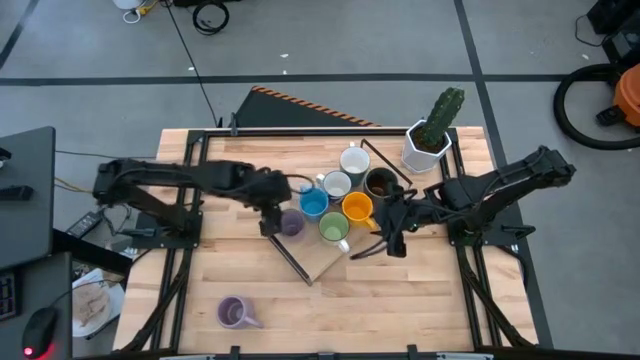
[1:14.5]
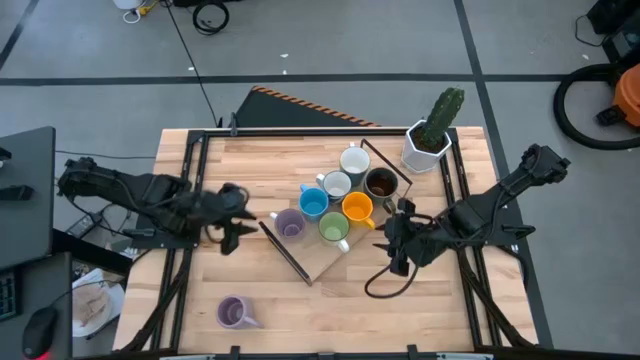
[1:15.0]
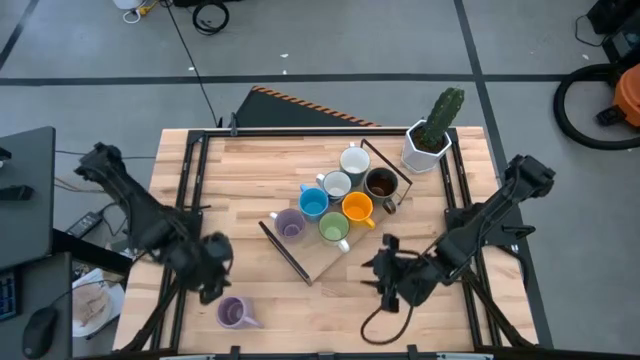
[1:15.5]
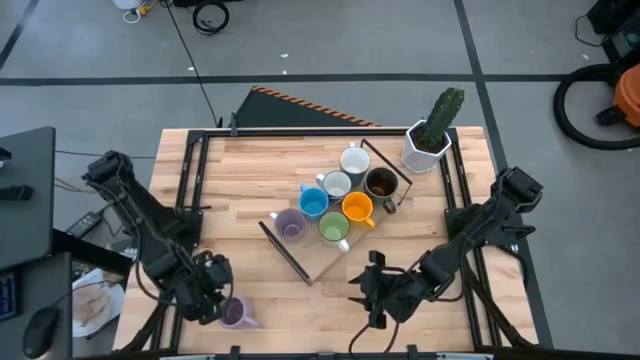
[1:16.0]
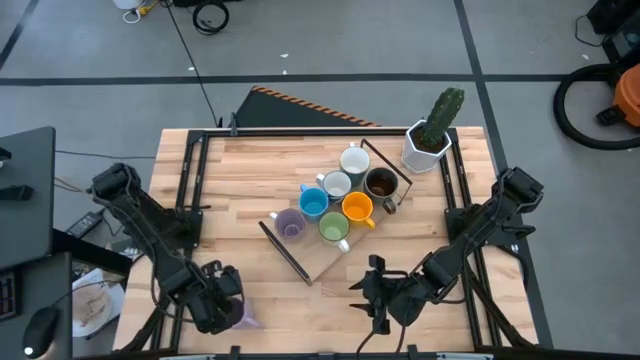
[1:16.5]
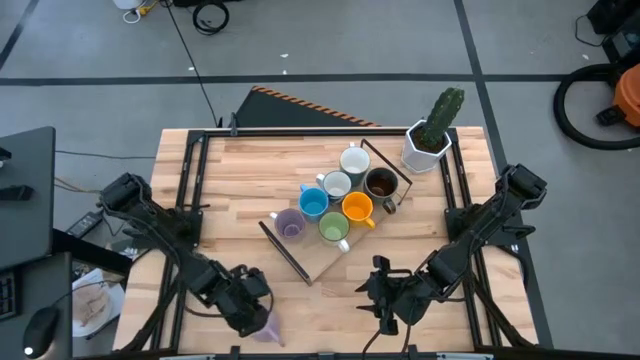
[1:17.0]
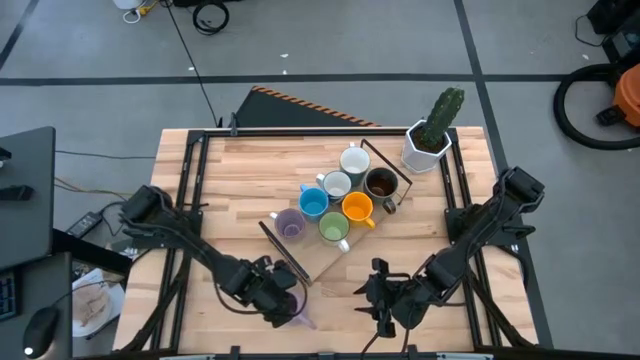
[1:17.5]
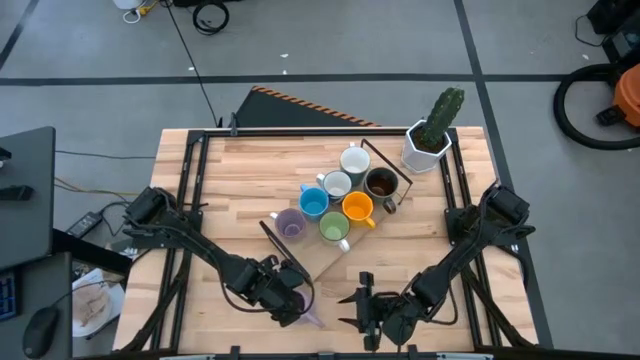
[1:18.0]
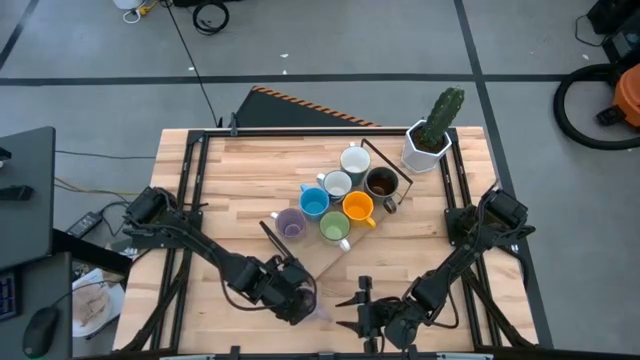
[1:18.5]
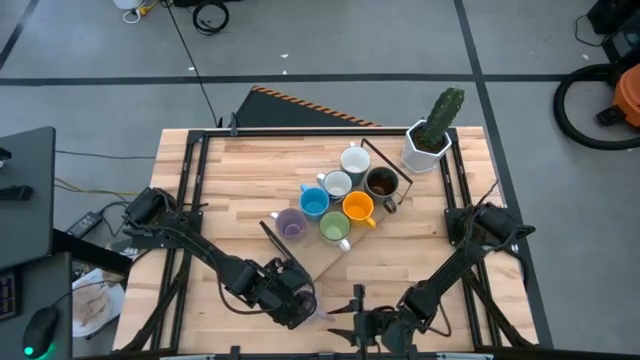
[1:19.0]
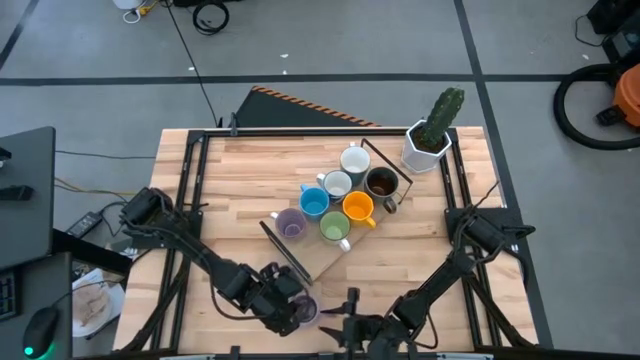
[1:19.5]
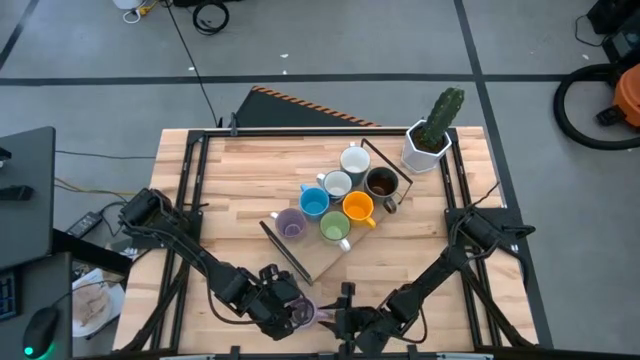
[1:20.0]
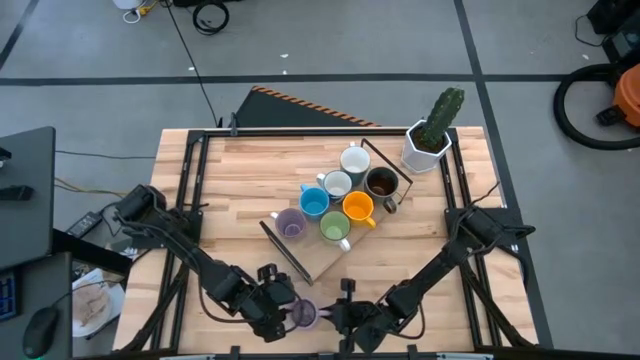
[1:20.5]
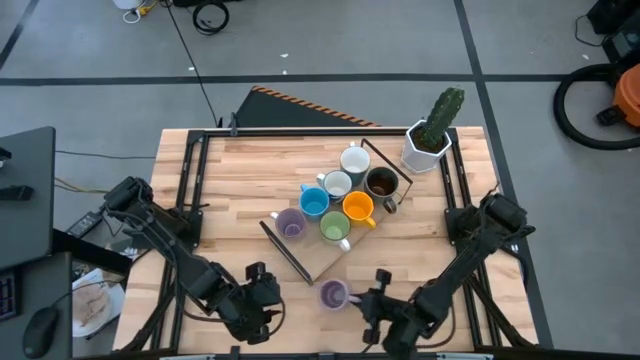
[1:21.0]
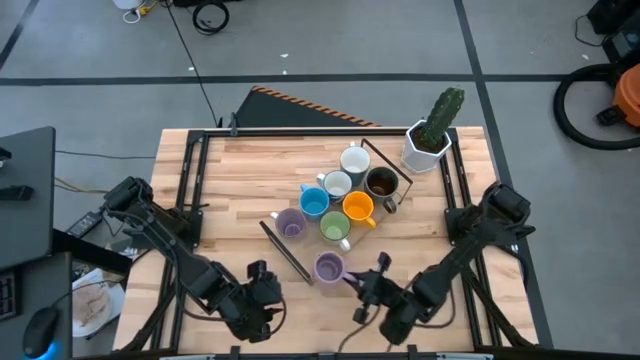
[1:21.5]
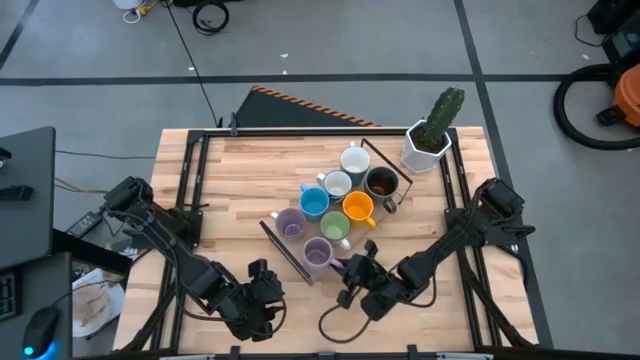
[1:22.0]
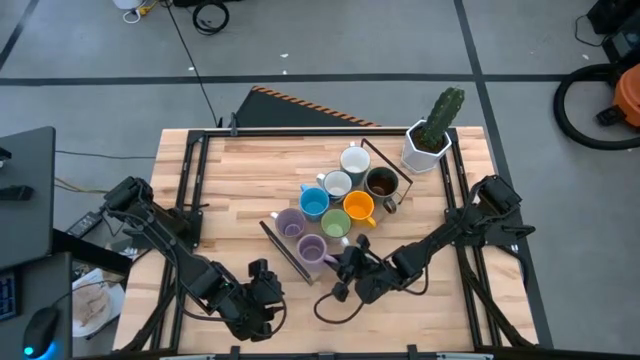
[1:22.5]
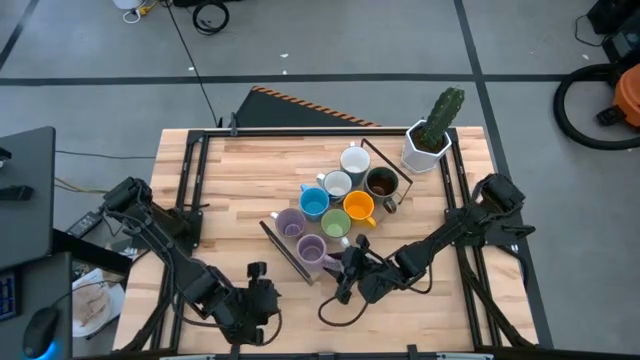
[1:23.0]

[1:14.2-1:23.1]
Task: Place coffee mugs
Put the violet mug on the shelf

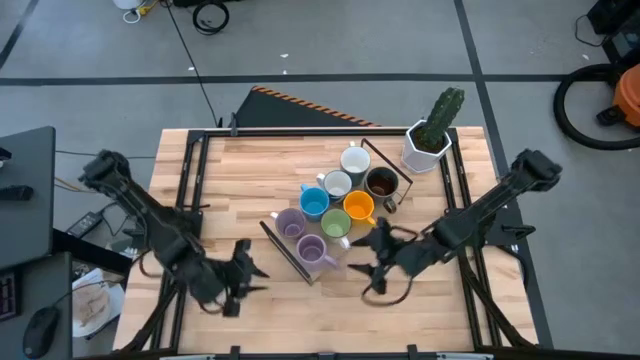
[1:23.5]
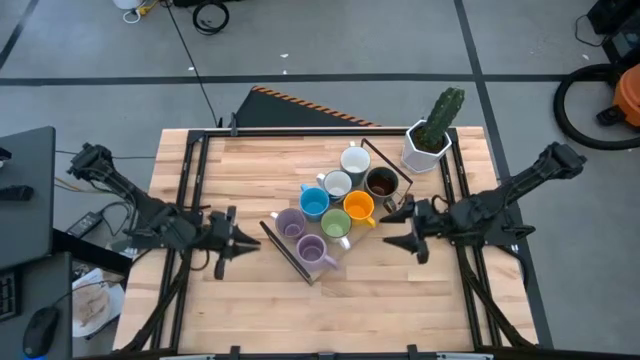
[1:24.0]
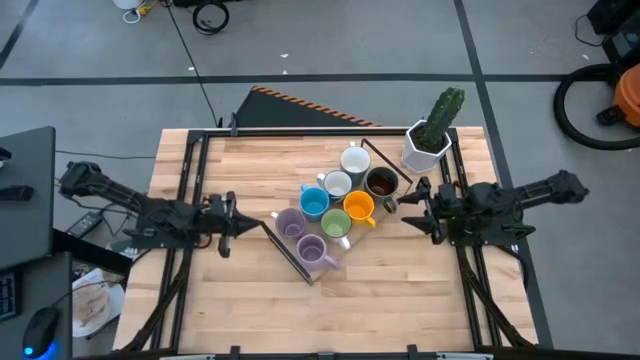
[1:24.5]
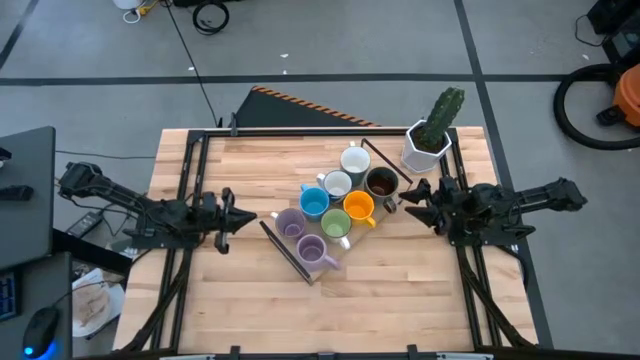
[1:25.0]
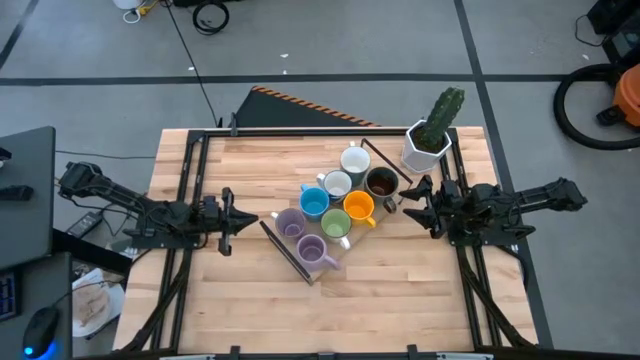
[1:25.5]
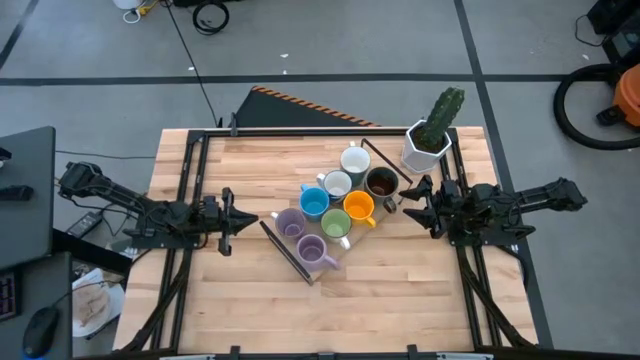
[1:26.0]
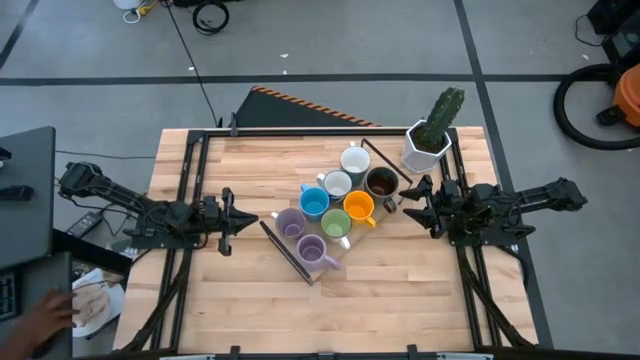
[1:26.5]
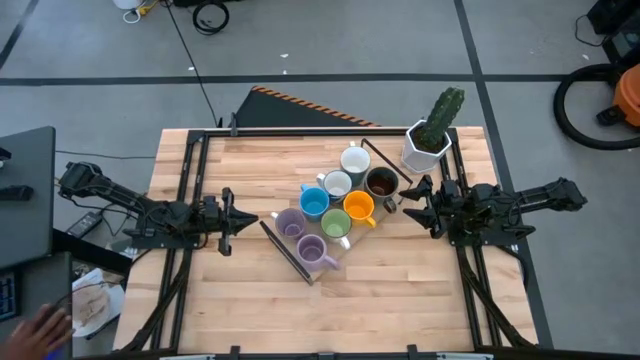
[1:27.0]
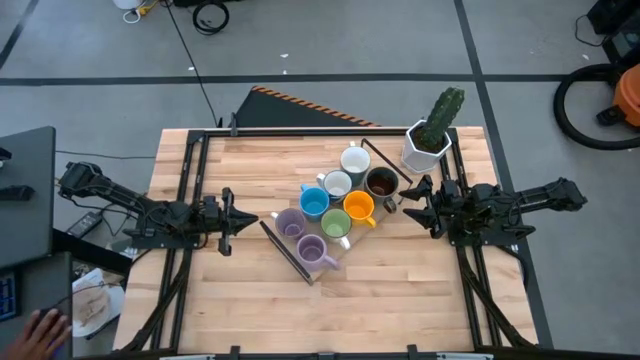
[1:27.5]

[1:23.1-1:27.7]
Return to Home Position

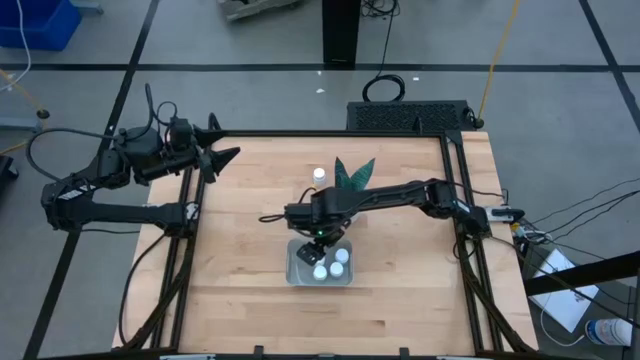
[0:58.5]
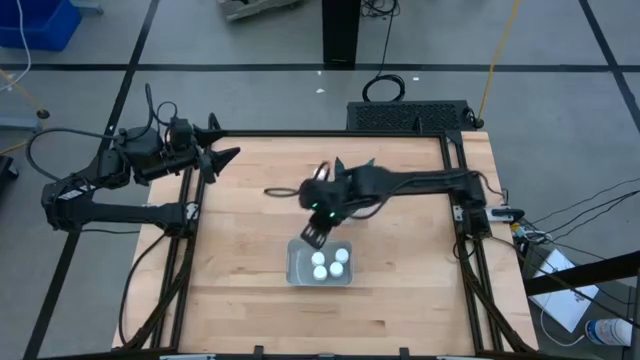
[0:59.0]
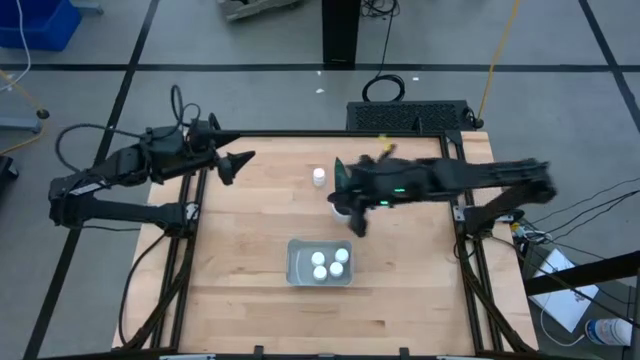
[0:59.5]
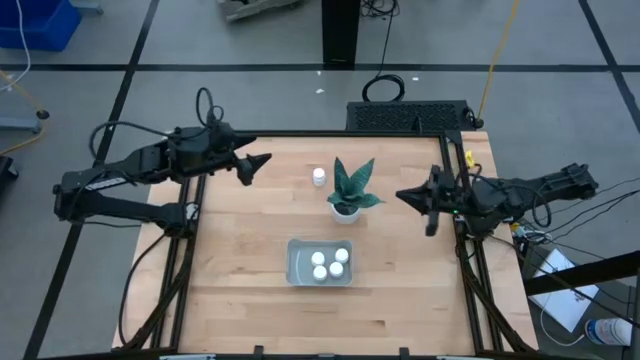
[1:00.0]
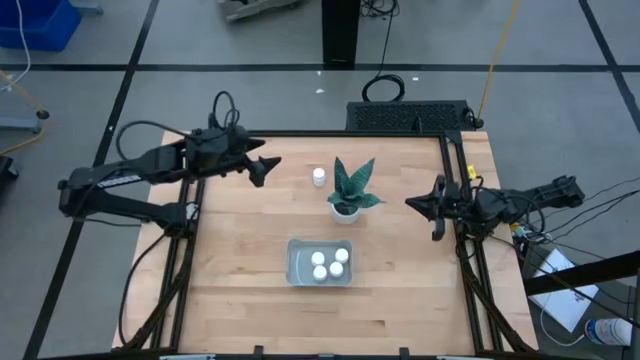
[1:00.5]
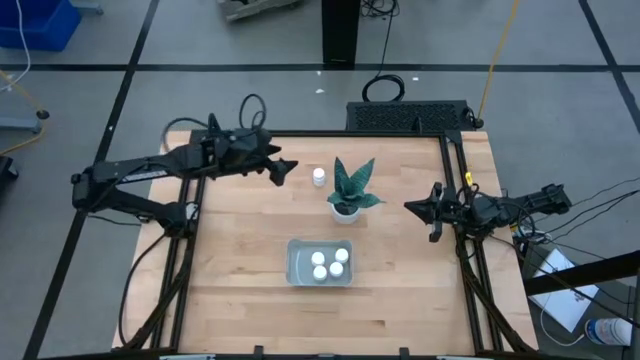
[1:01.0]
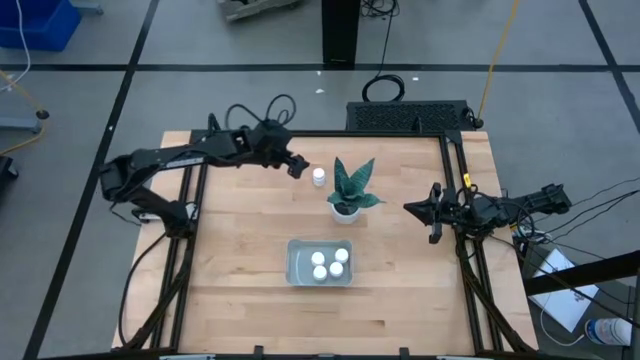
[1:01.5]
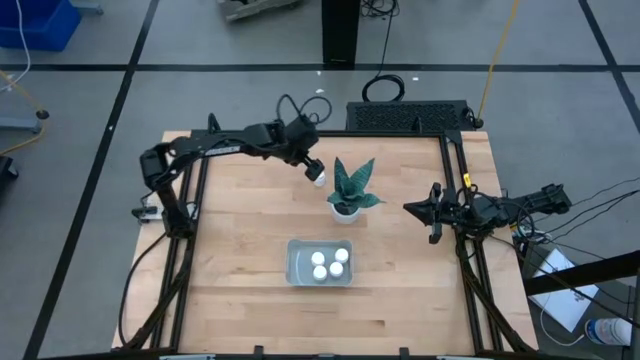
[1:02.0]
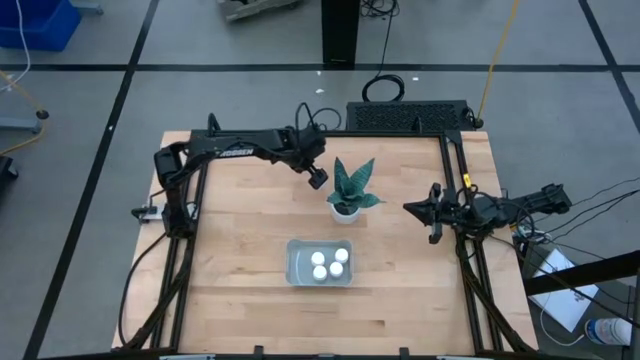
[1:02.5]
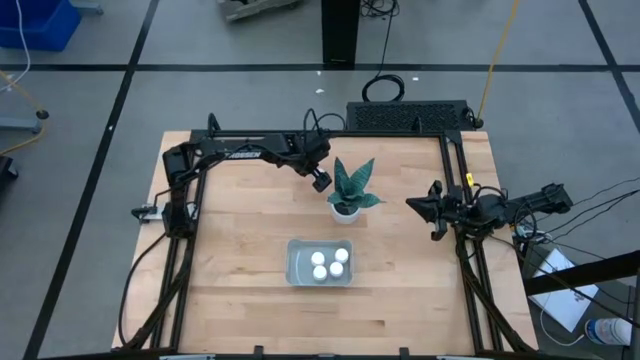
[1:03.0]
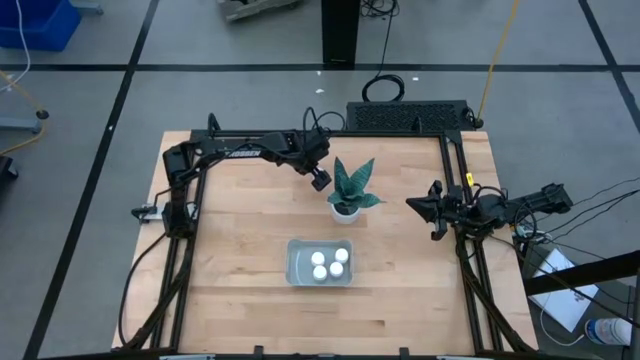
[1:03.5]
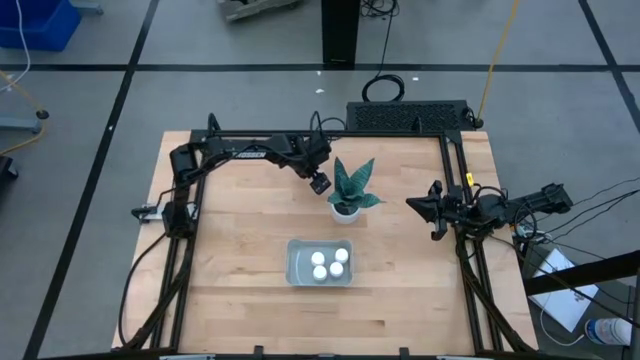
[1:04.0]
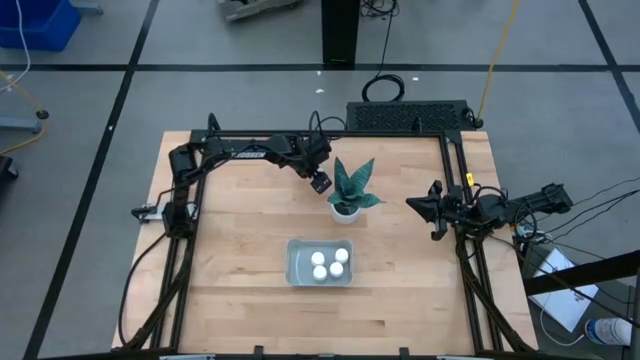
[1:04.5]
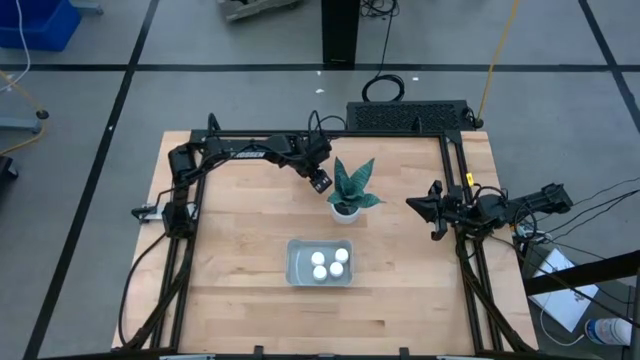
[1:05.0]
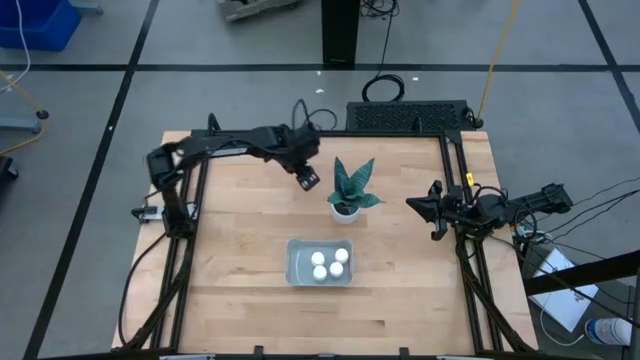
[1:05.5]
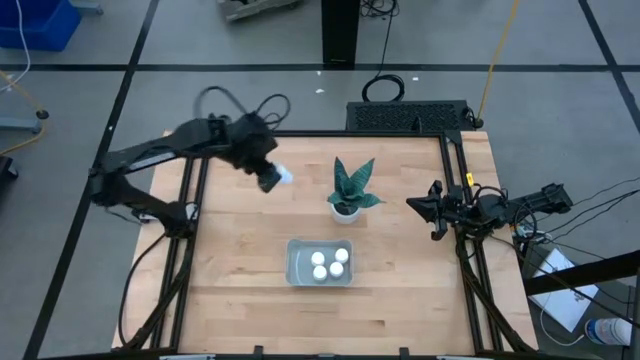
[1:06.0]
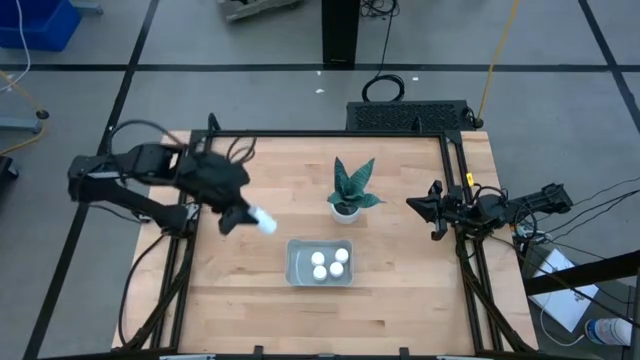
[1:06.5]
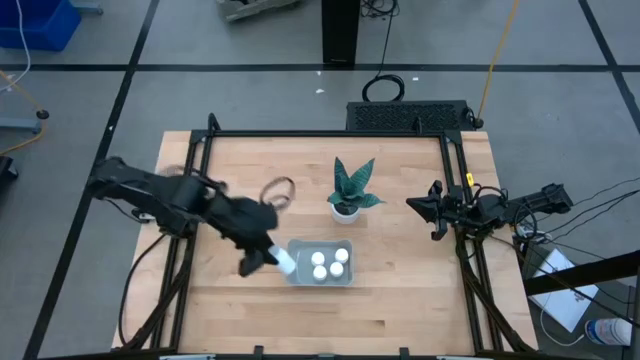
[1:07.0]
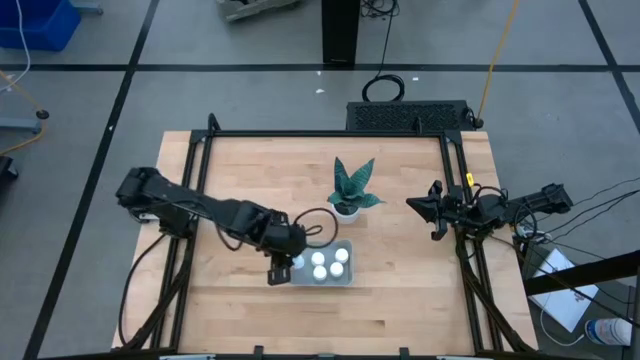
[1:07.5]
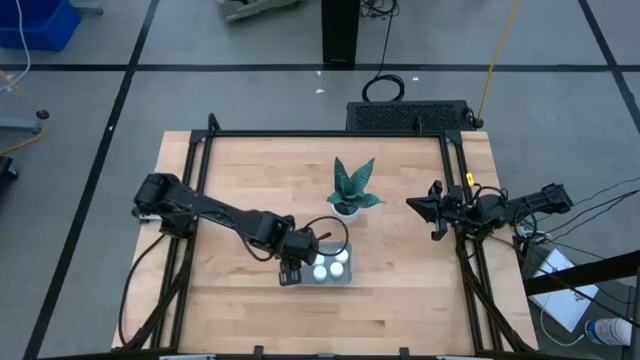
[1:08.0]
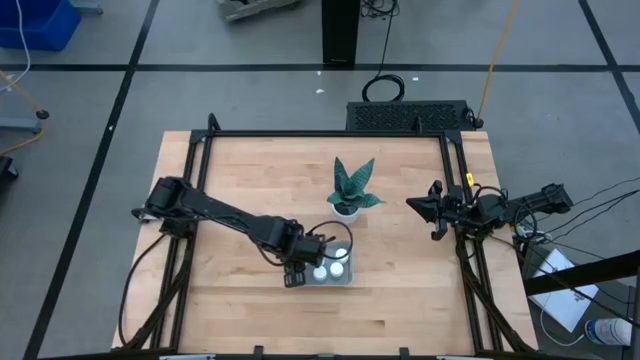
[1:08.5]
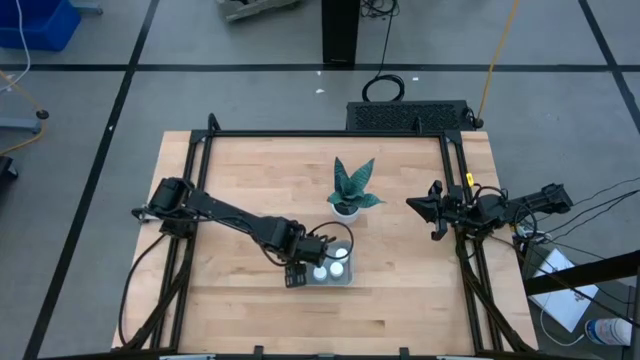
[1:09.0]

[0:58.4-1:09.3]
Task: Pick and place pill bottles into a basket
Put the white pill bottle into the white bin
